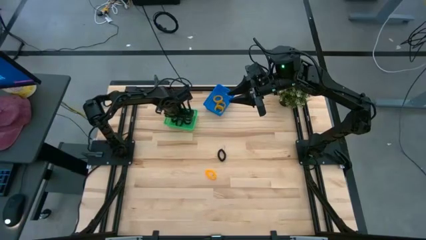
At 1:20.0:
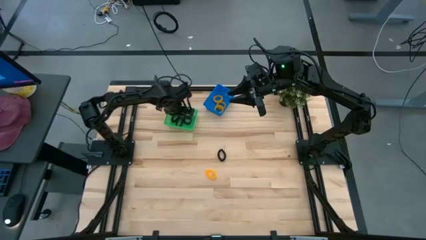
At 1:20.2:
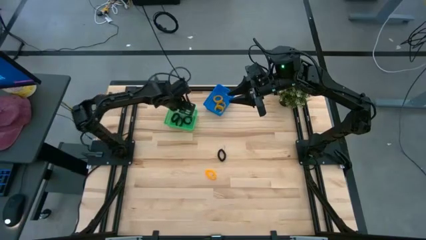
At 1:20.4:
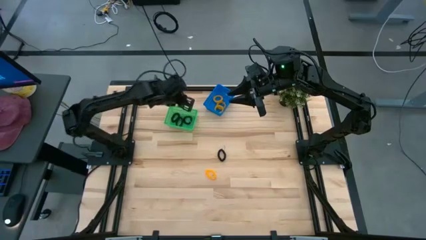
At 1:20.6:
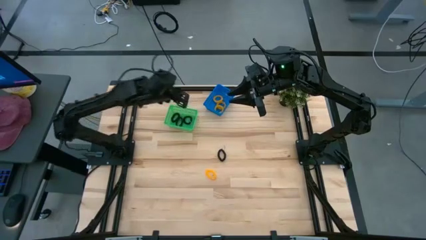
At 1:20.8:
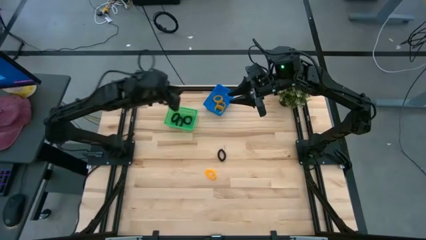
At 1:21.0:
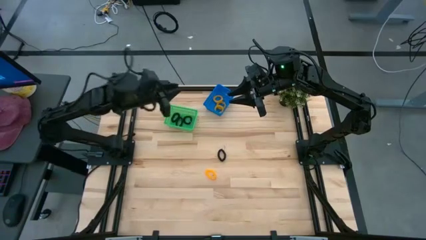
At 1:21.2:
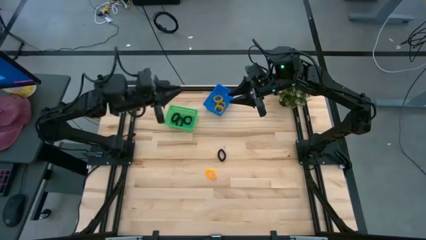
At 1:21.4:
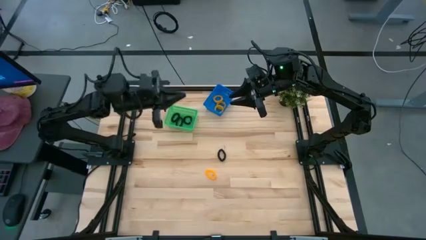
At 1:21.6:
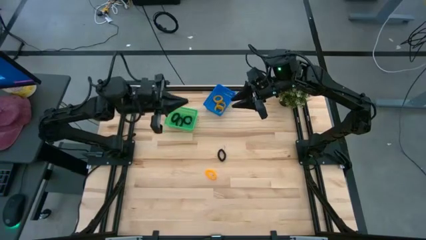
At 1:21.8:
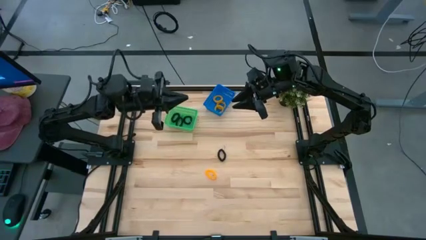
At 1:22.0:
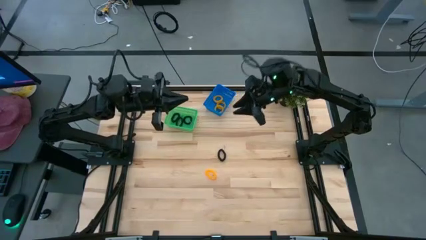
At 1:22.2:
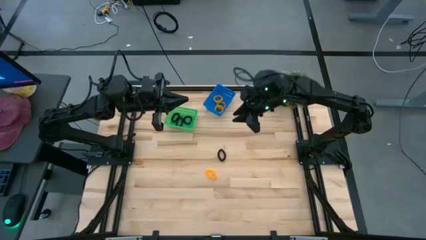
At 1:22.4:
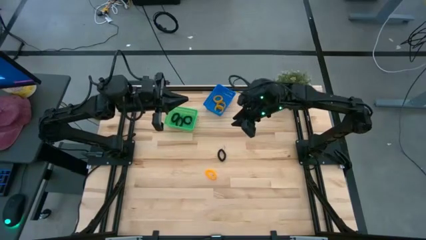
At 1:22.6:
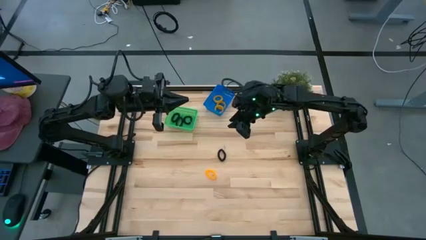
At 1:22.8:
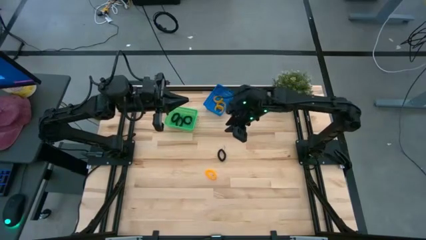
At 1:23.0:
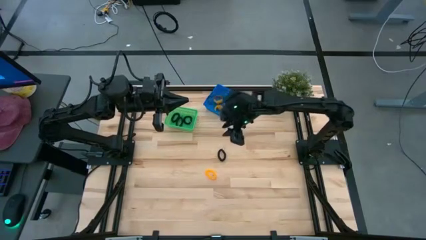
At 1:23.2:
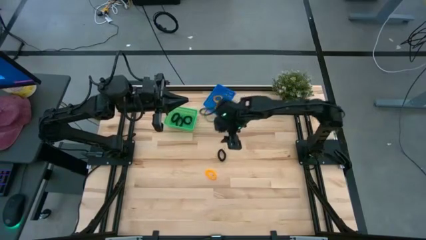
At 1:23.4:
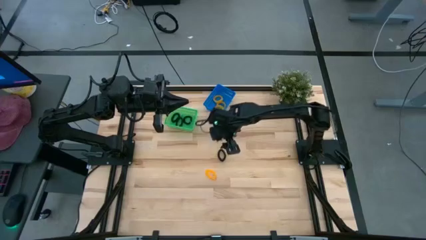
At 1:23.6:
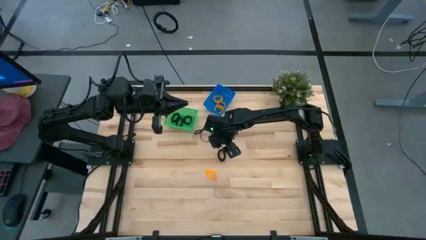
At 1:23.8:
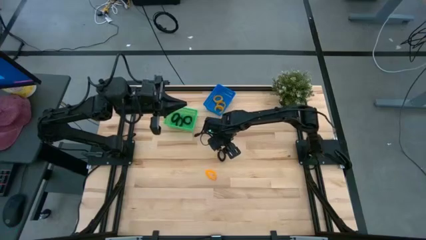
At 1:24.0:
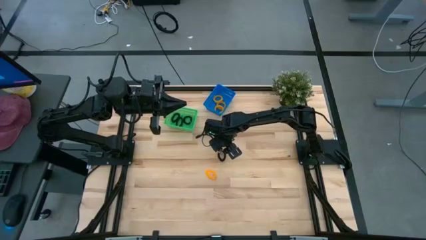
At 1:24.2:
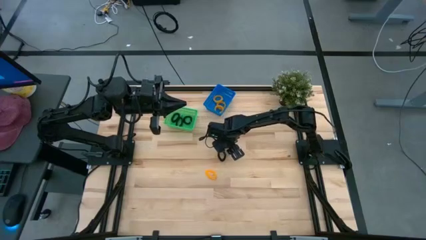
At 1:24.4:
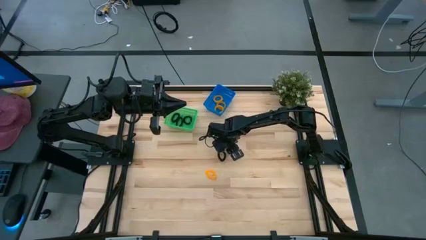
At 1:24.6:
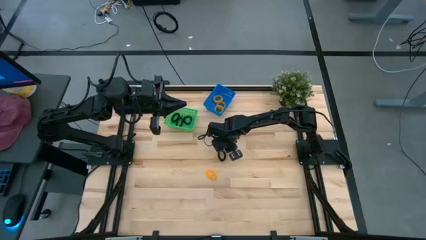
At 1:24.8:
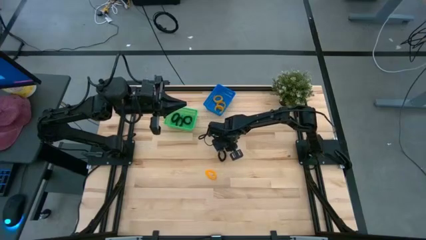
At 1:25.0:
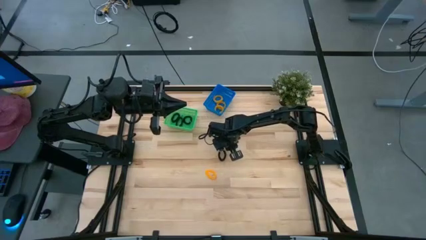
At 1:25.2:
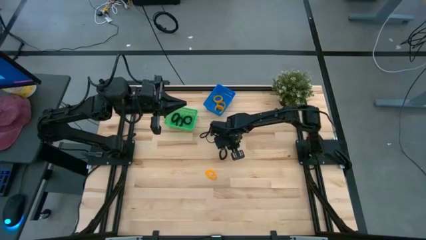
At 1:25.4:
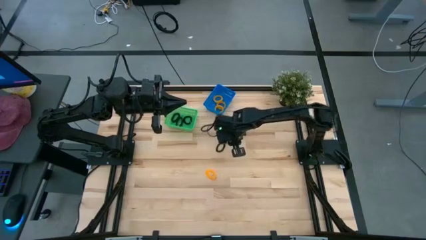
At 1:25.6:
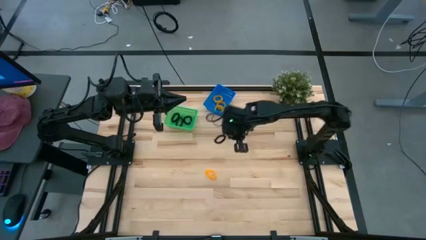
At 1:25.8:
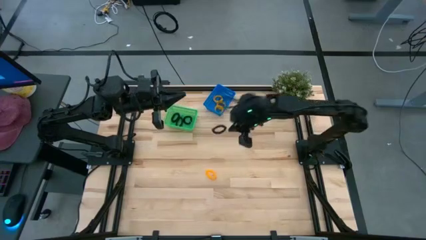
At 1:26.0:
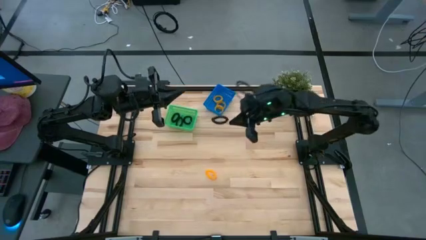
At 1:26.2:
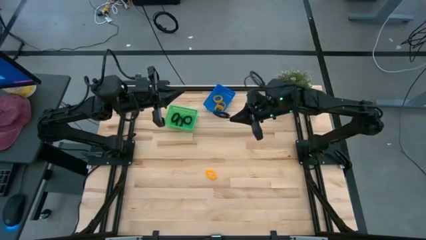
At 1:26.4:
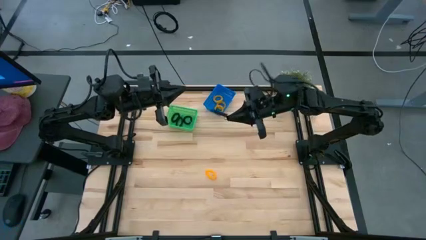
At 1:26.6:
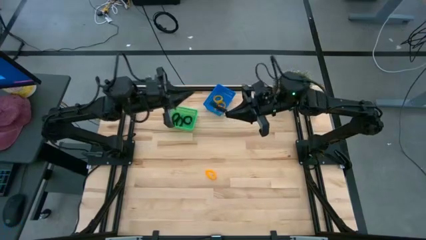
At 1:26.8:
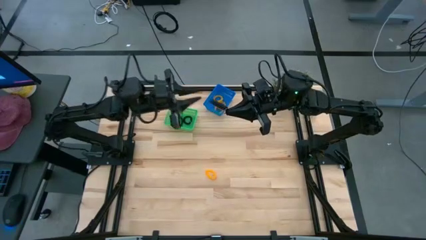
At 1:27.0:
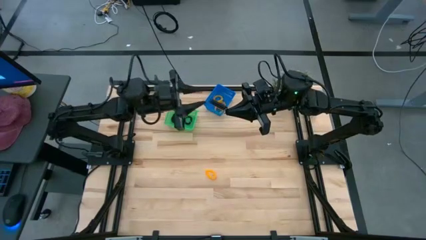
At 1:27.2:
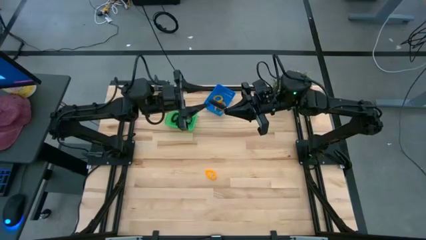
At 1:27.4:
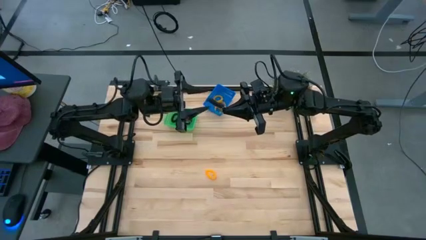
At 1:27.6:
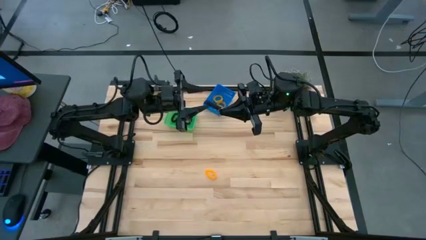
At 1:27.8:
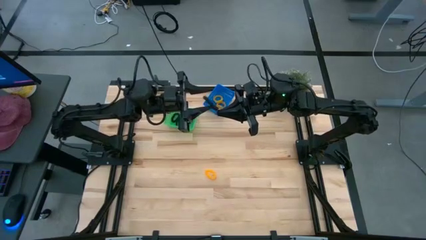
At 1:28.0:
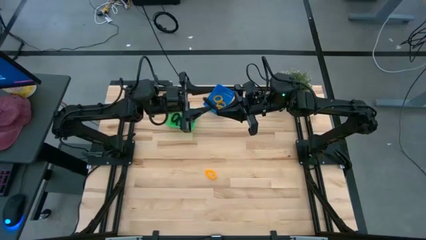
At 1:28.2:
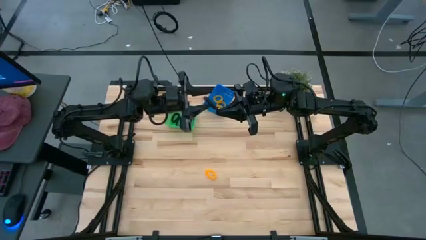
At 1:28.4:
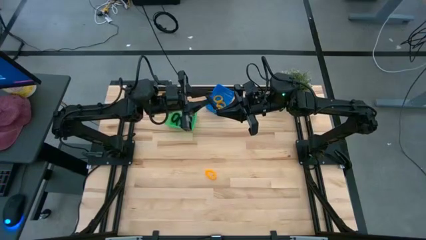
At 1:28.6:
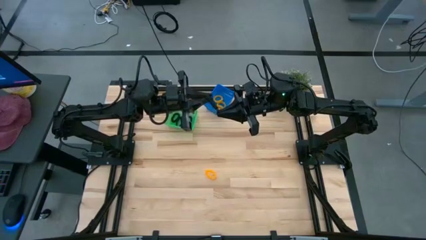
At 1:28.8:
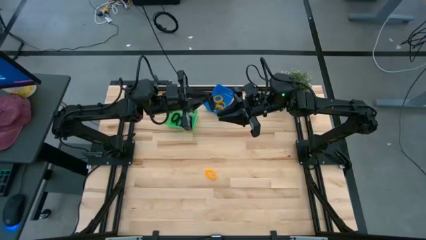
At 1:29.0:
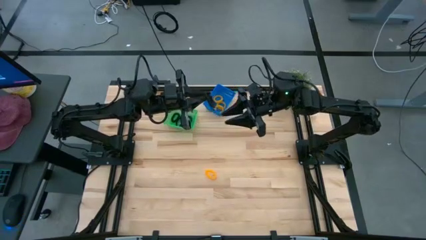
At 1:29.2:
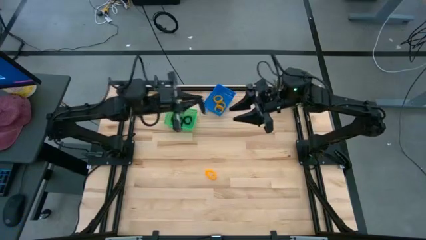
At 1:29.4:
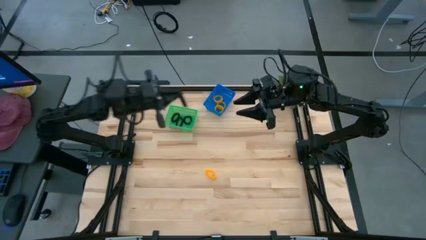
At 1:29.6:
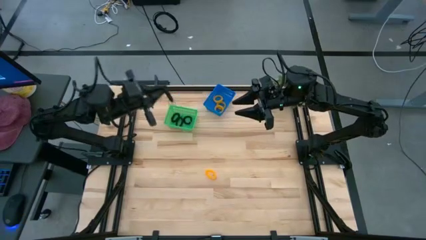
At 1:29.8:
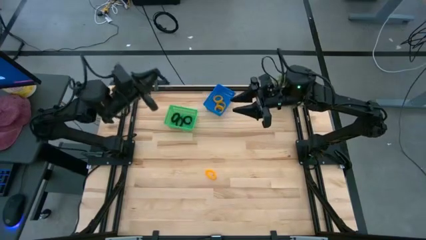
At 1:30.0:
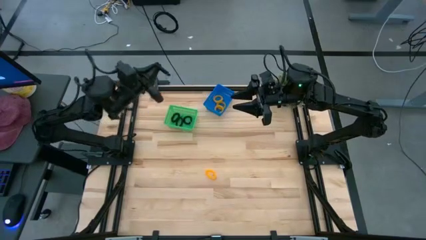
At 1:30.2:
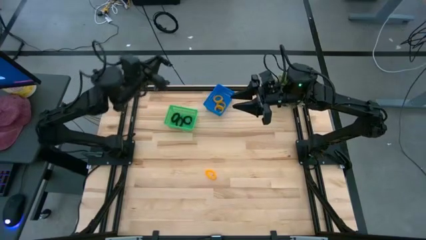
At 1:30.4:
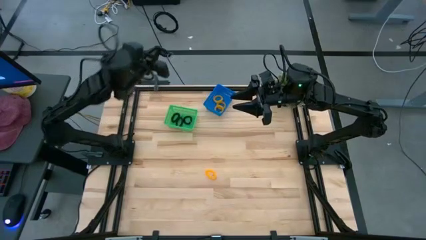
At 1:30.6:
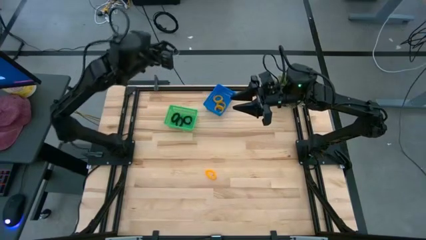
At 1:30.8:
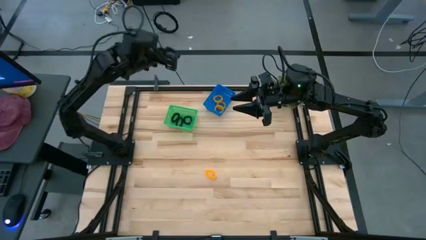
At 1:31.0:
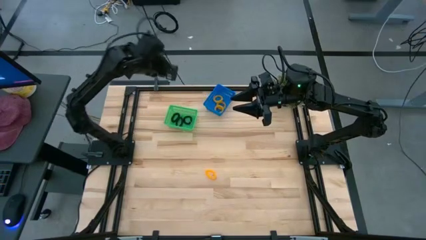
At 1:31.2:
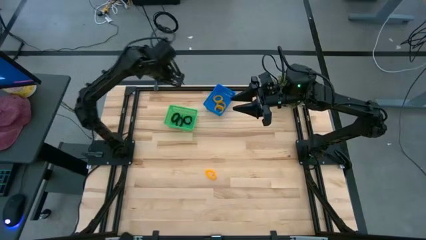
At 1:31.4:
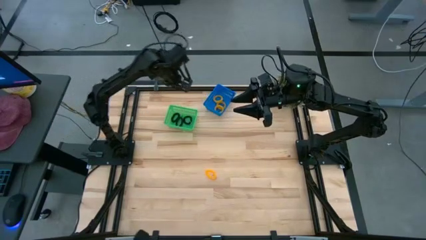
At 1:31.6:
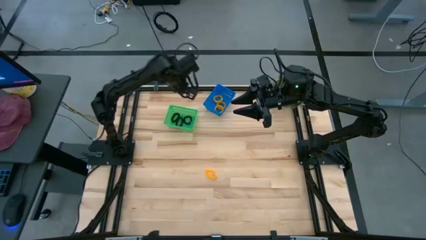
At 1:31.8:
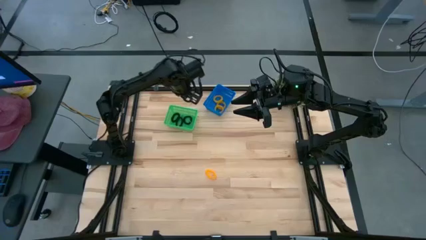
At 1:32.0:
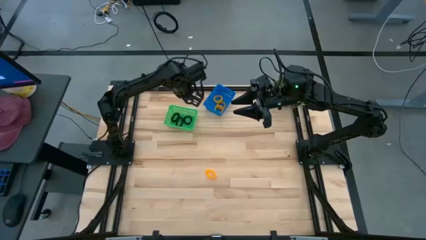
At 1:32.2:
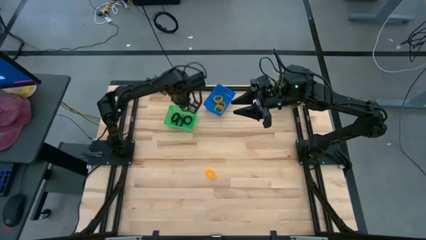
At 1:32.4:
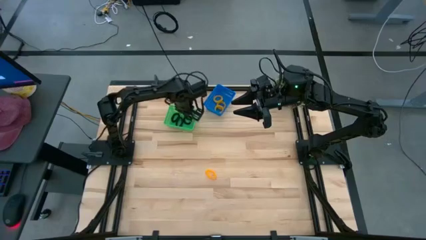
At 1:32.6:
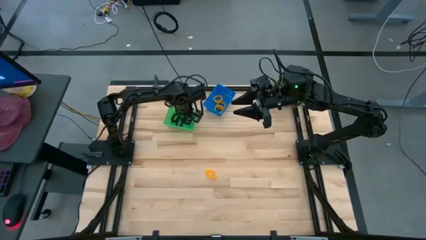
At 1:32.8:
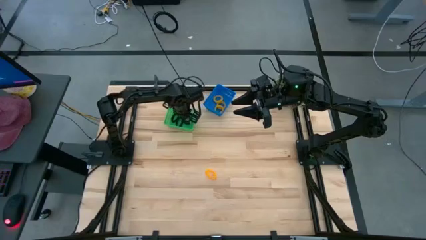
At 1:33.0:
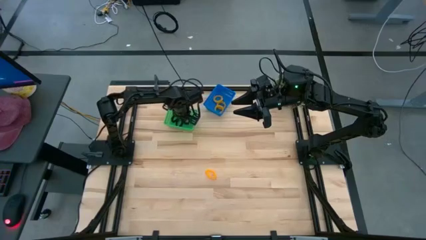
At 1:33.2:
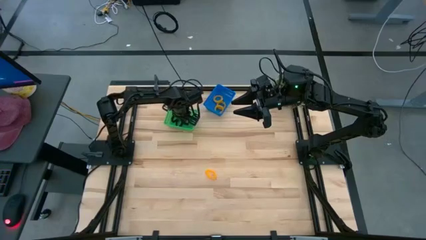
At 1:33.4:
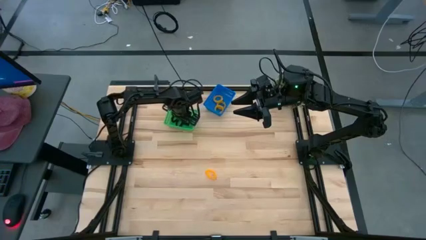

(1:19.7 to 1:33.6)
Task: Sort spring keychains into baskets
Put the black spring keychain into the green basket
